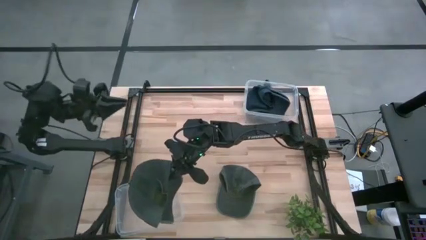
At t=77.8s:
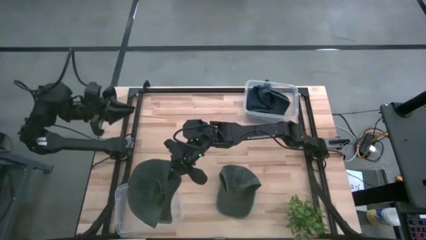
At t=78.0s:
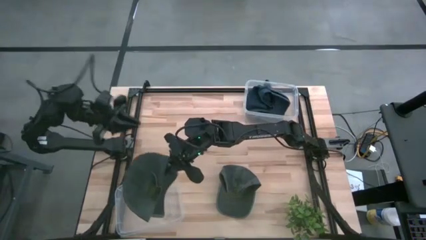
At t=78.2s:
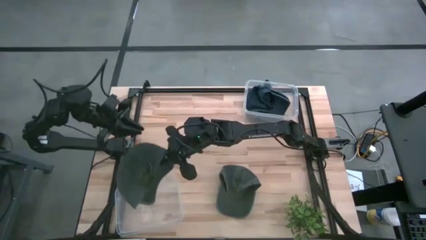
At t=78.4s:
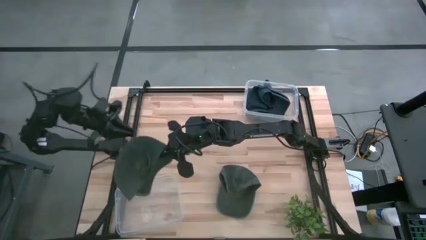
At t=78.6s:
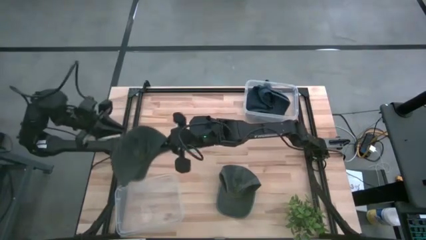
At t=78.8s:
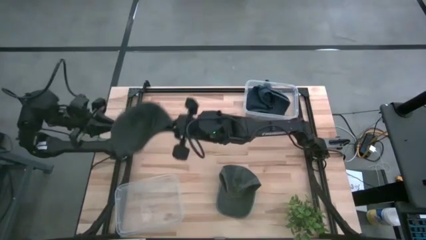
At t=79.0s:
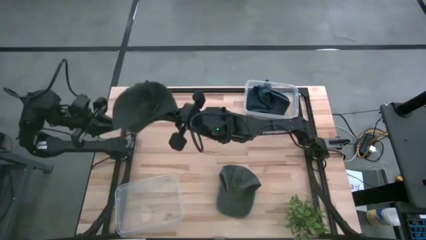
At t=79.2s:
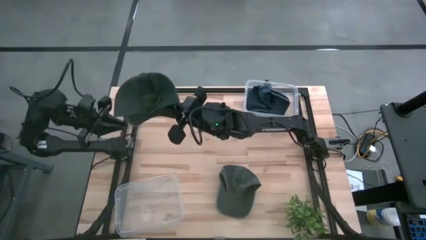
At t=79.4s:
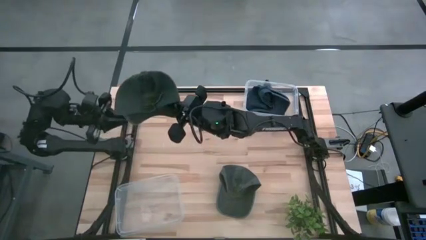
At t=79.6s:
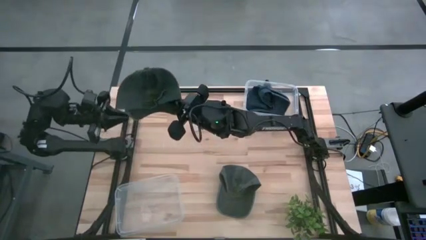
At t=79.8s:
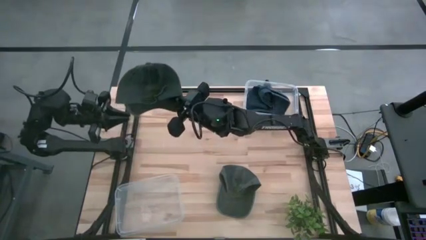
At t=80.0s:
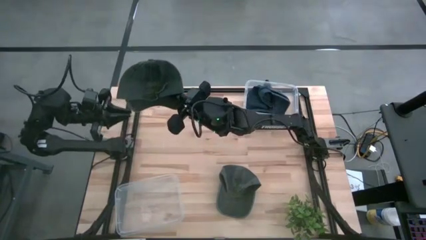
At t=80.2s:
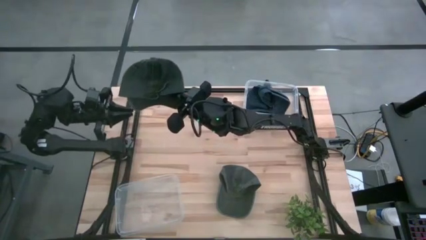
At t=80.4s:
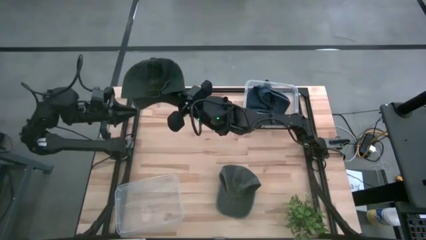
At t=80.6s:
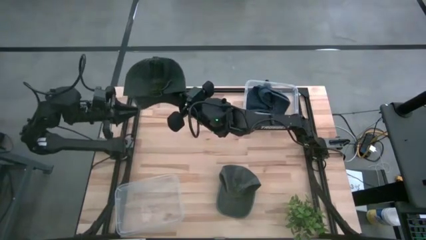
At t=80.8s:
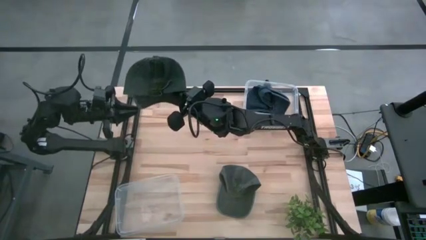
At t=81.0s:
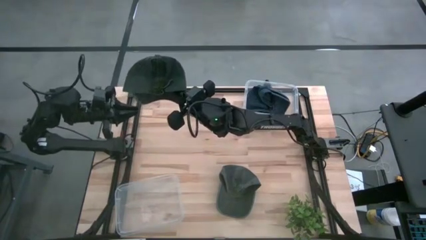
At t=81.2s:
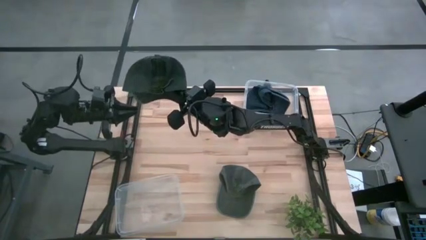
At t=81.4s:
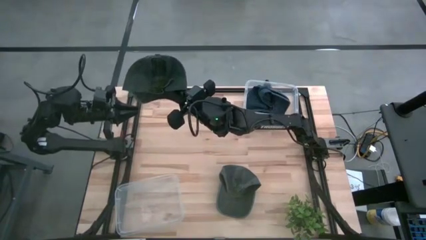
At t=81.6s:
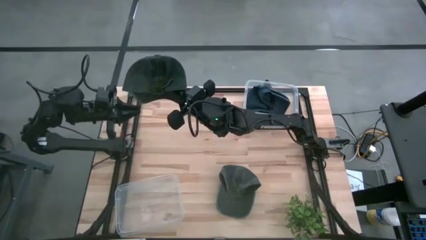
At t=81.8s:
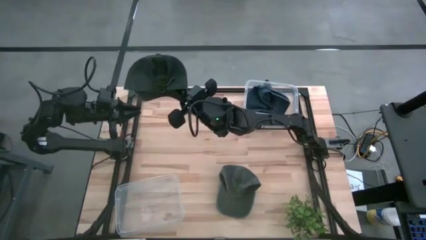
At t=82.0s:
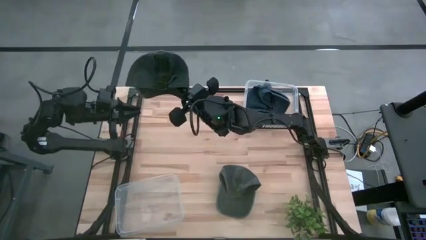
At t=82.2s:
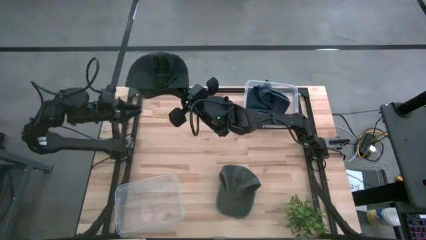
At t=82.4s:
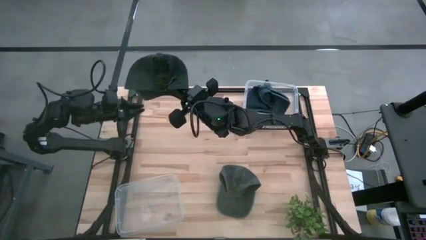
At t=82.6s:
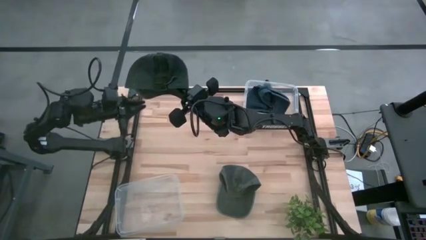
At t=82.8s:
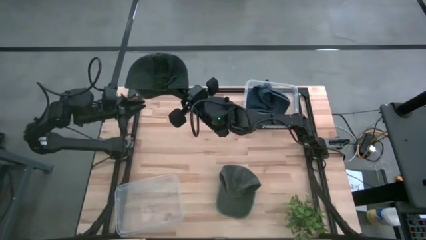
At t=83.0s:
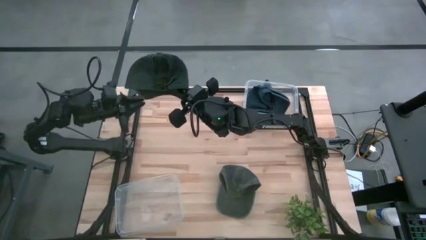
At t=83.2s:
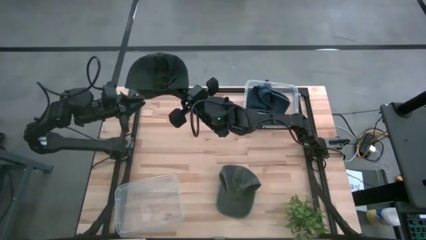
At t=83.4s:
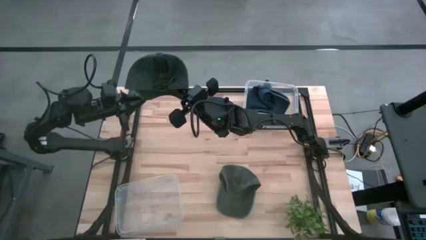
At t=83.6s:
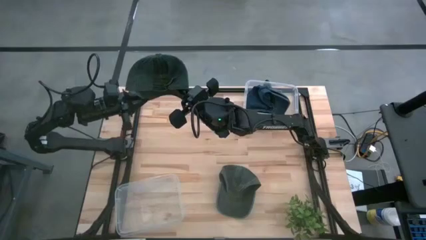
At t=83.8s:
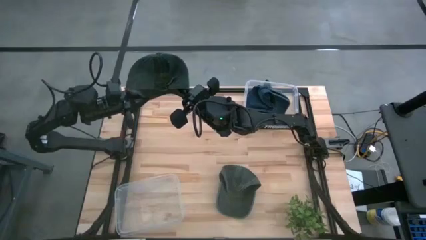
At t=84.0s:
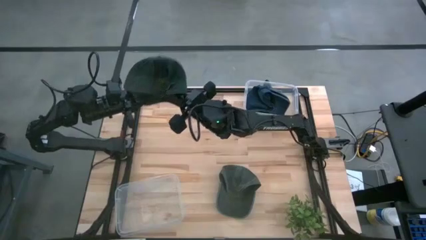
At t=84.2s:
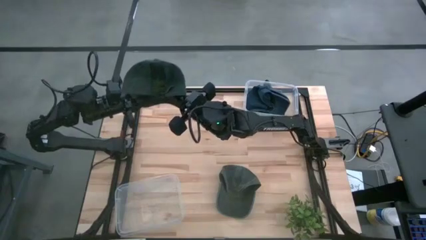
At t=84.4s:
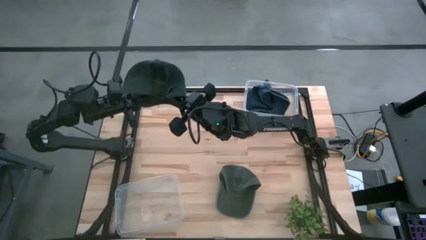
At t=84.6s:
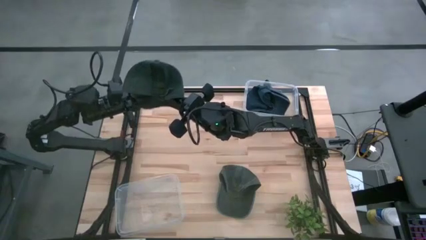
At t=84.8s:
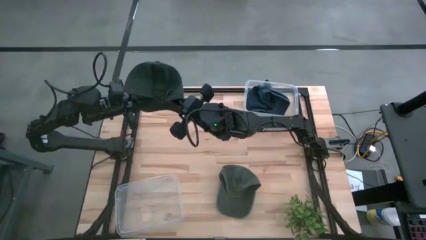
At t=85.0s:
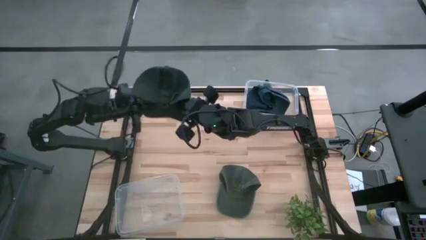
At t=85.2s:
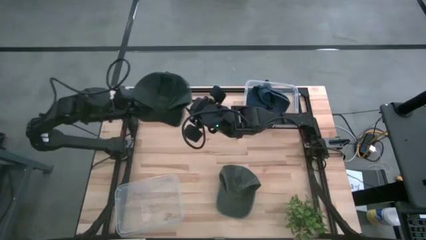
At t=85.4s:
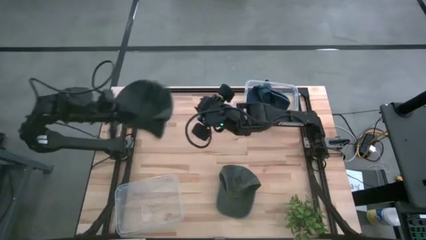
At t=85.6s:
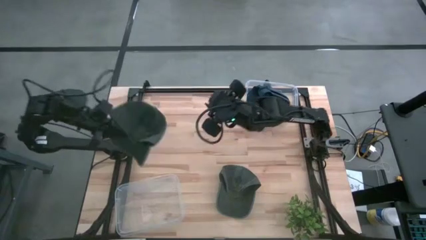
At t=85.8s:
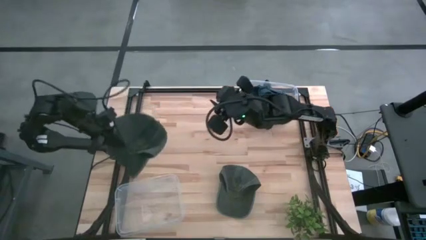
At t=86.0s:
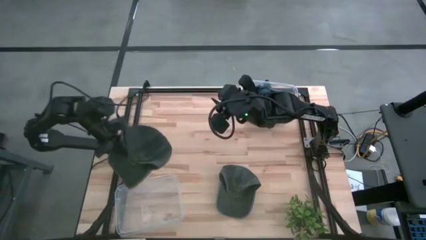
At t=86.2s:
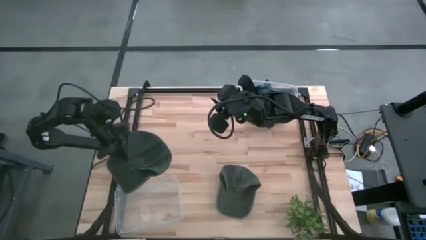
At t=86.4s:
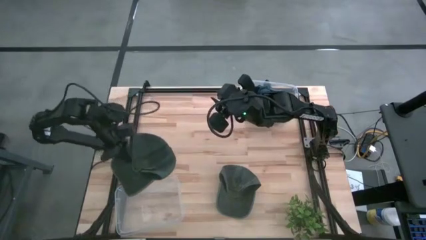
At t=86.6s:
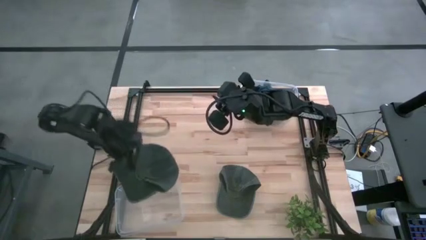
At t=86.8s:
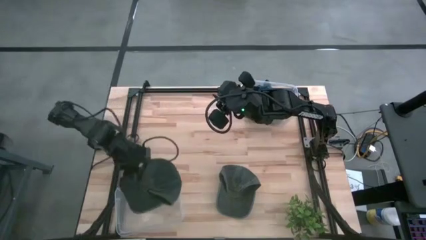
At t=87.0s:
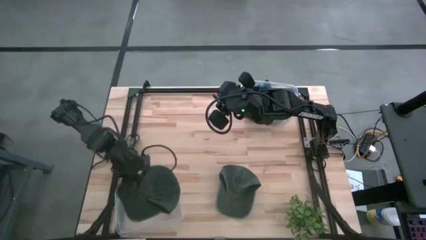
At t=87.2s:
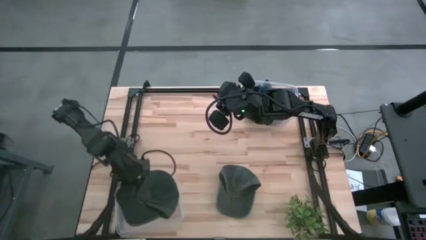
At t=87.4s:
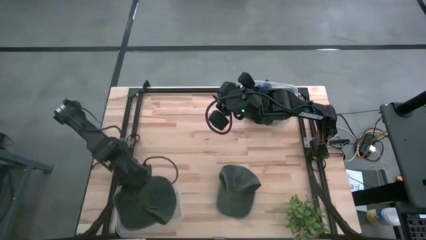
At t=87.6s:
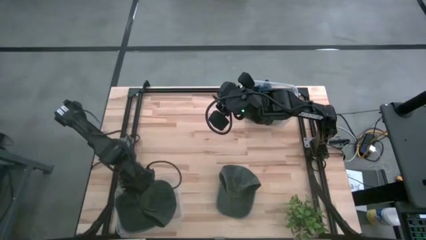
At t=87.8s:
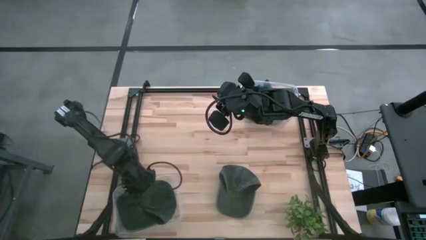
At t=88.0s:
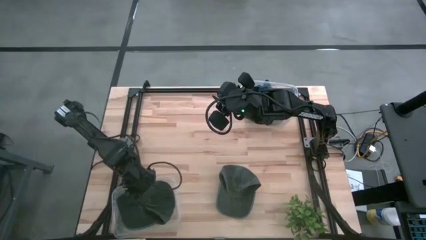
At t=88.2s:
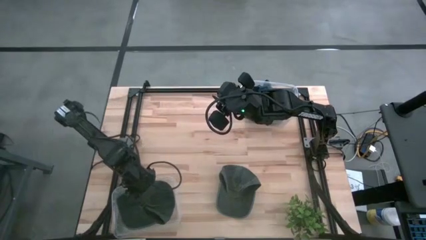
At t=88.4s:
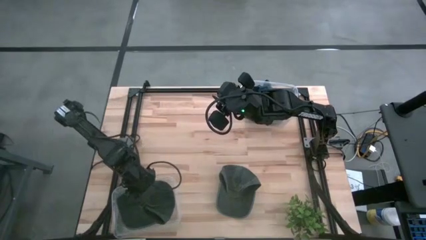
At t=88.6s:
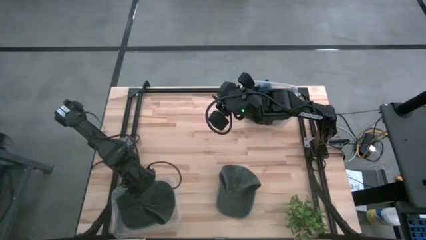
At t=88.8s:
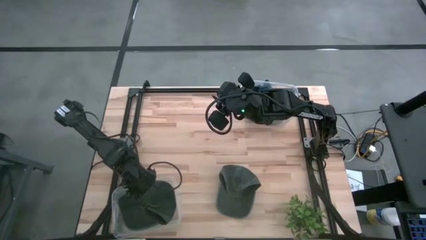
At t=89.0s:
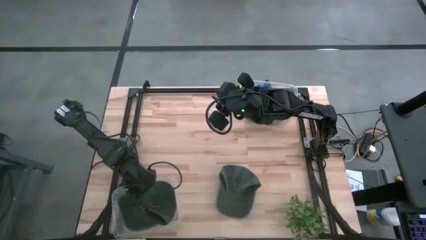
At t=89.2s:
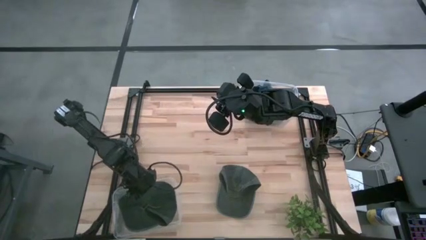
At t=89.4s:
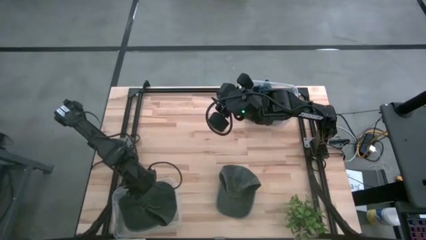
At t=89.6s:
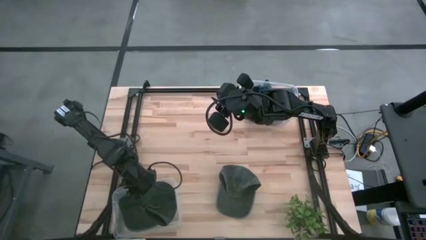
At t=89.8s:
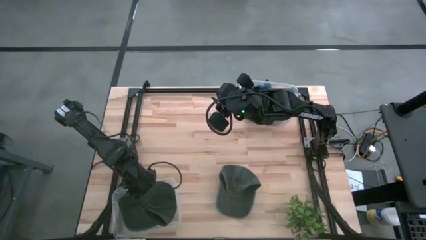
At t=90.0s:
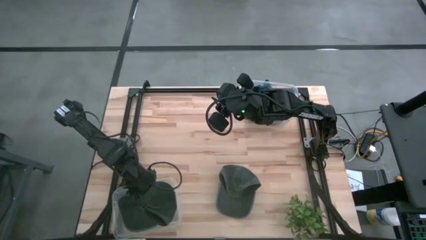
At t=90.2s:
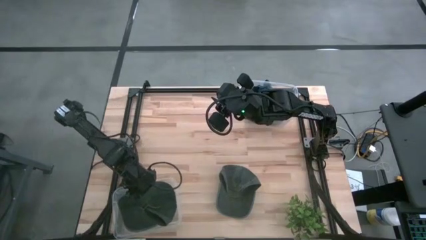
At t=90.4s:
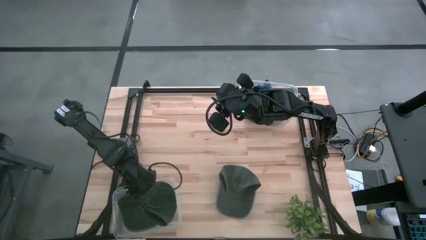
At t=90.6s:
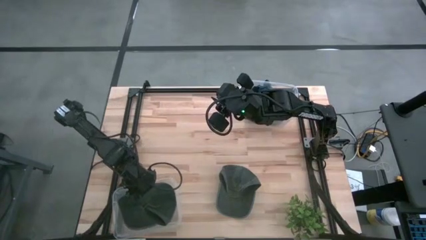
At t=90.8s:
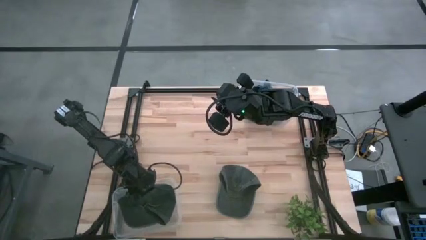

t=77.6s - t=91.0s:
Task: Pick & Place hat
Put the top gray cap into the bottom transparent bin
